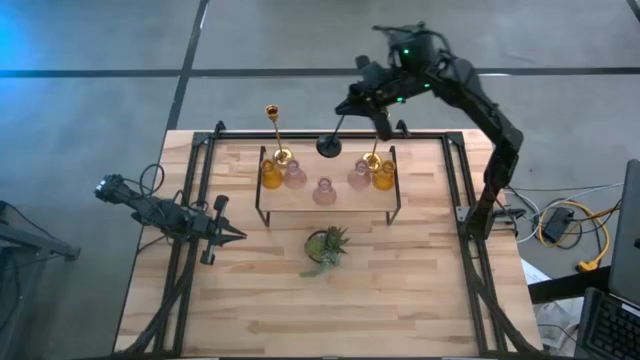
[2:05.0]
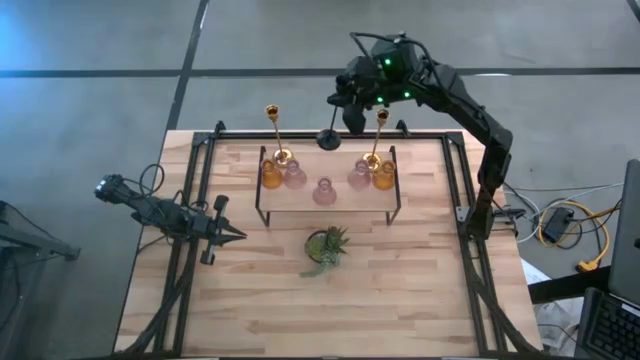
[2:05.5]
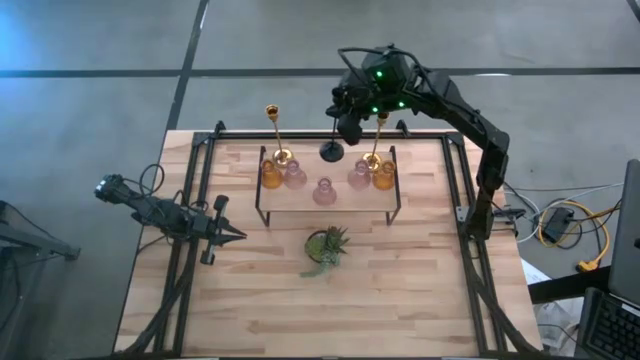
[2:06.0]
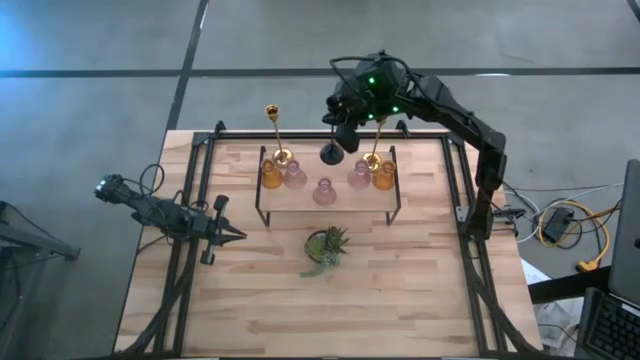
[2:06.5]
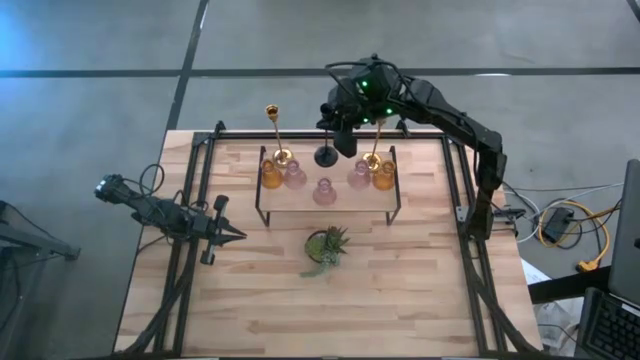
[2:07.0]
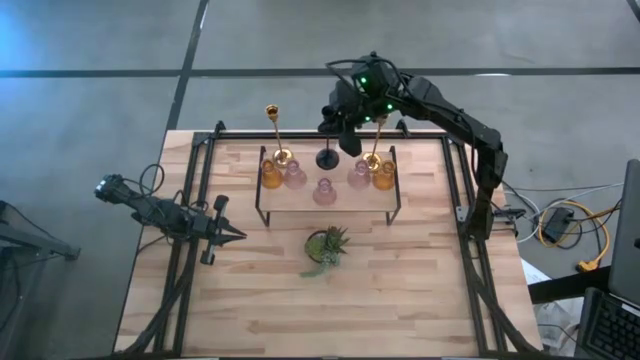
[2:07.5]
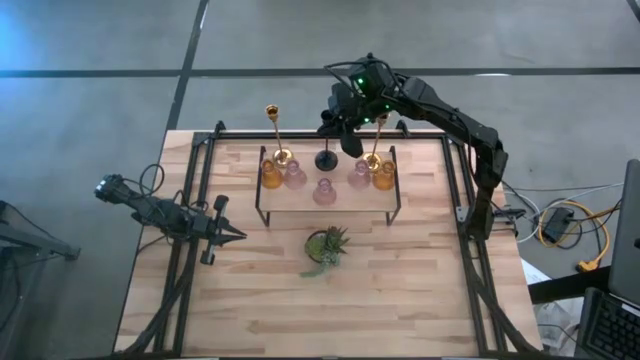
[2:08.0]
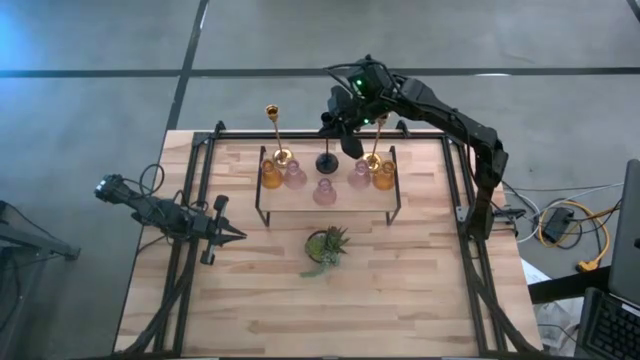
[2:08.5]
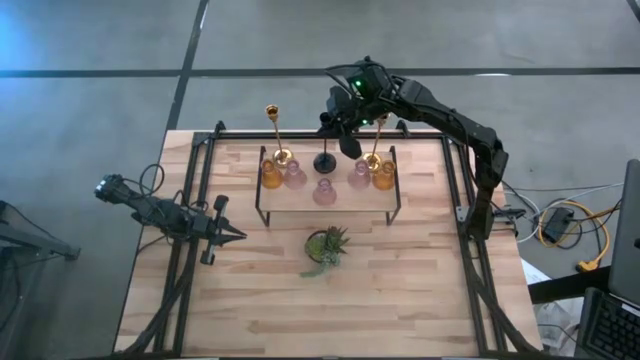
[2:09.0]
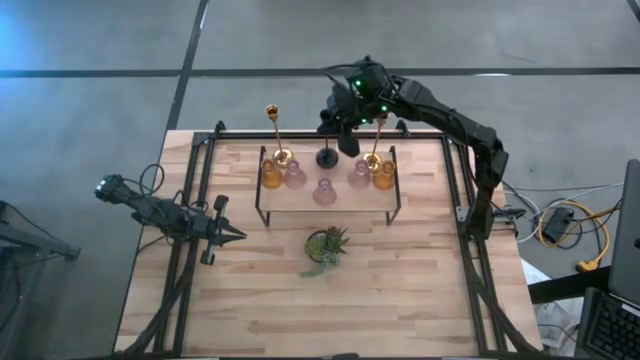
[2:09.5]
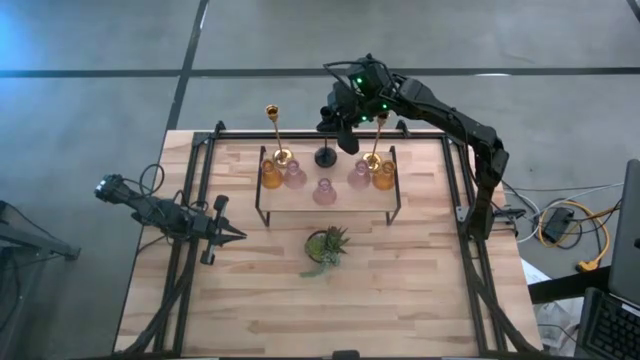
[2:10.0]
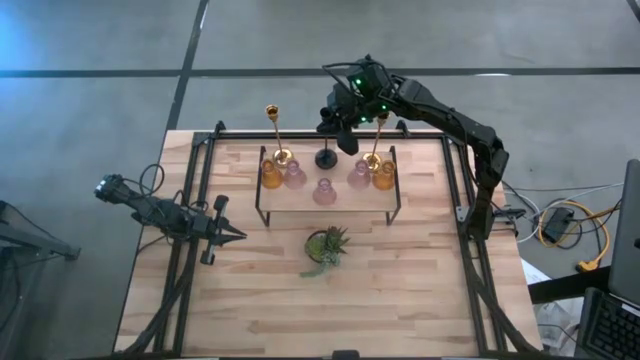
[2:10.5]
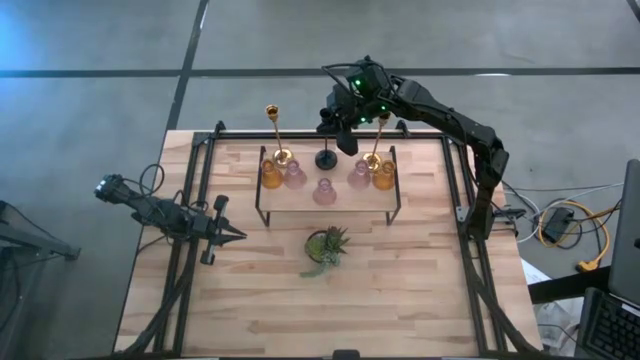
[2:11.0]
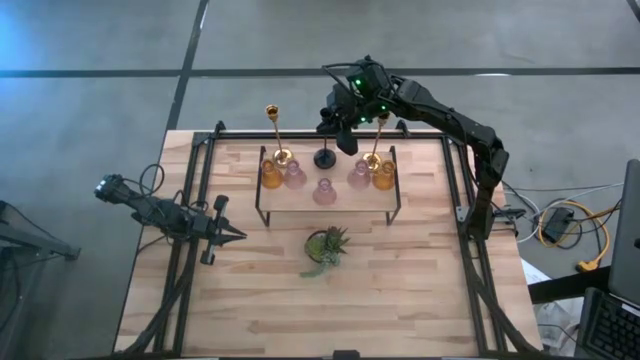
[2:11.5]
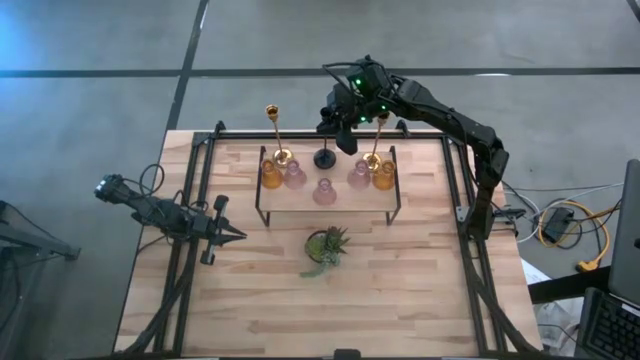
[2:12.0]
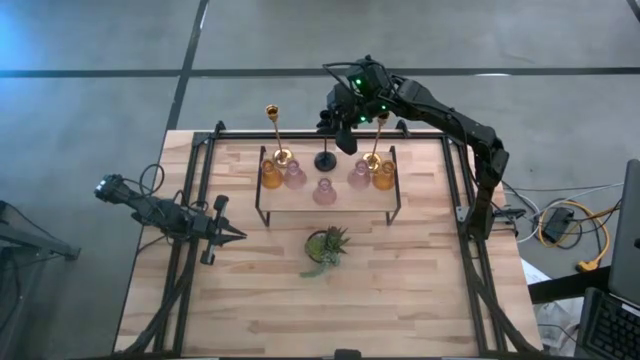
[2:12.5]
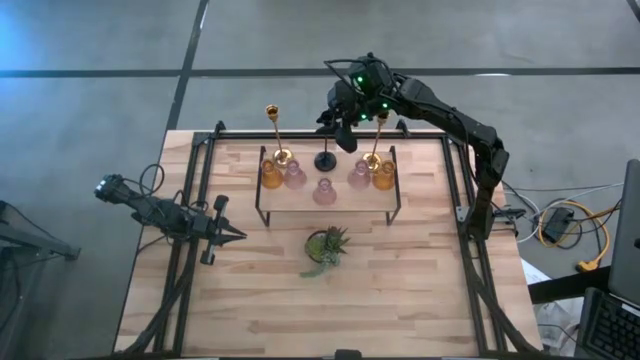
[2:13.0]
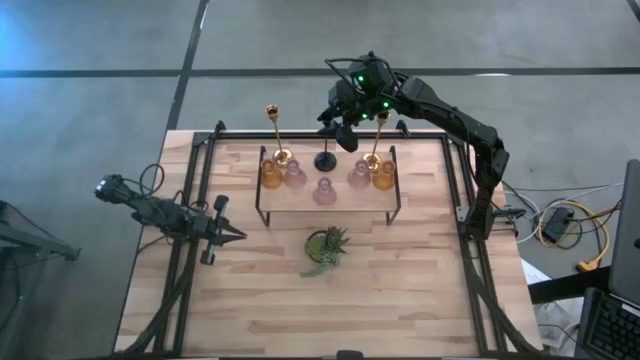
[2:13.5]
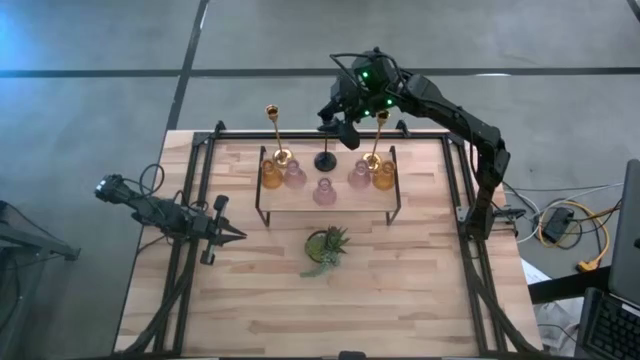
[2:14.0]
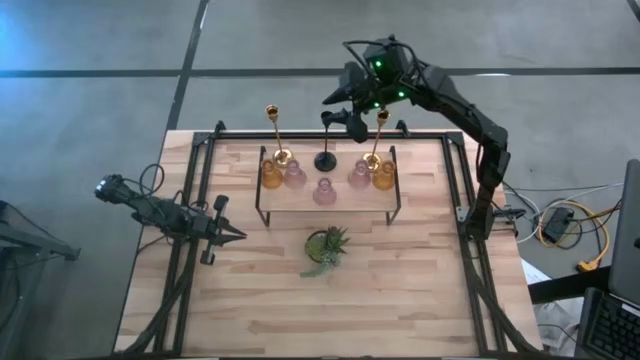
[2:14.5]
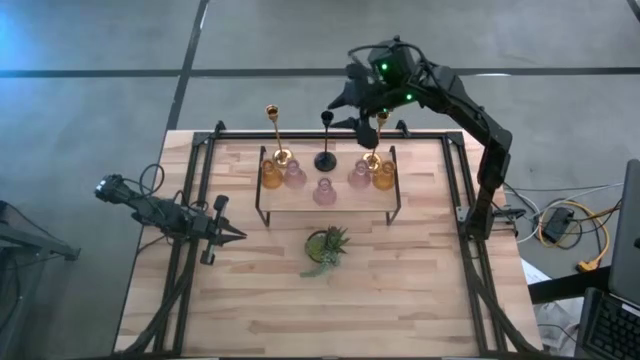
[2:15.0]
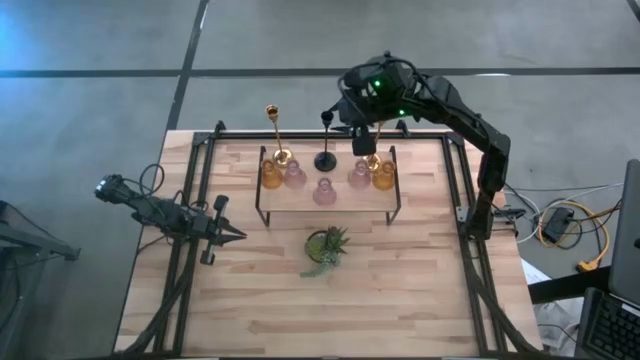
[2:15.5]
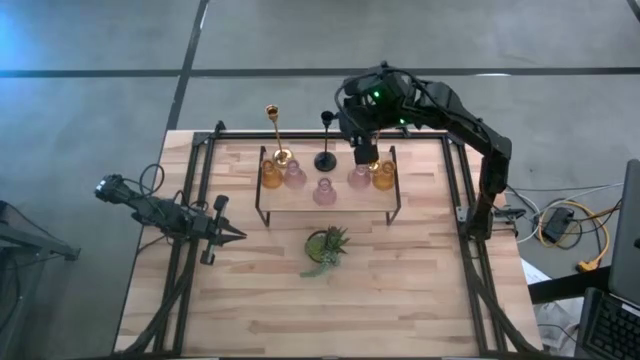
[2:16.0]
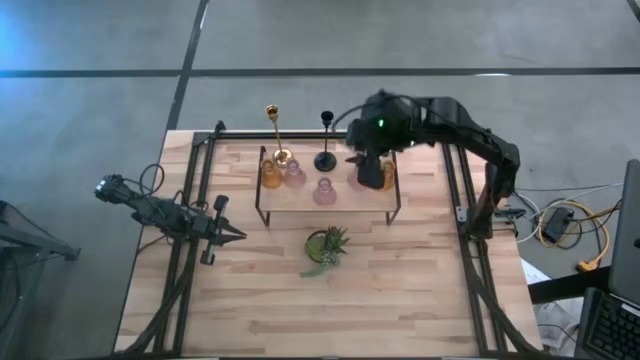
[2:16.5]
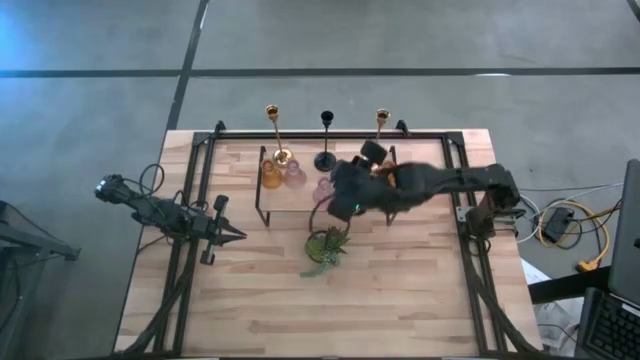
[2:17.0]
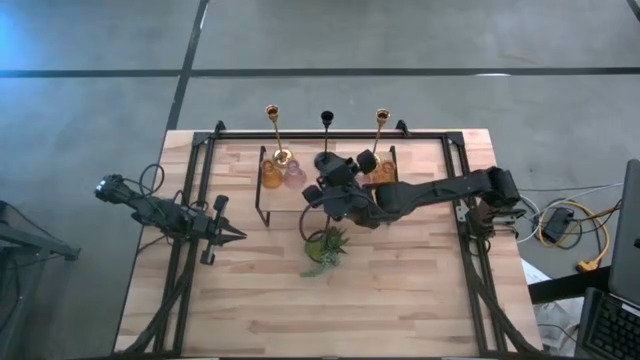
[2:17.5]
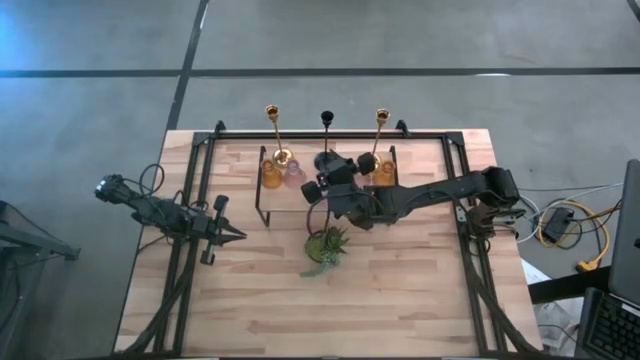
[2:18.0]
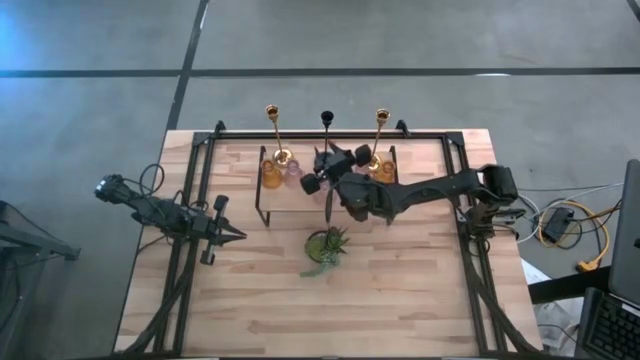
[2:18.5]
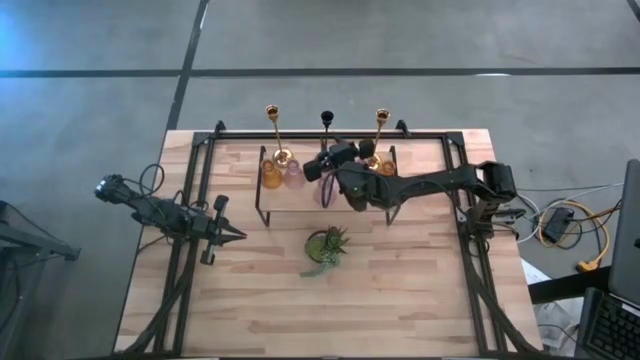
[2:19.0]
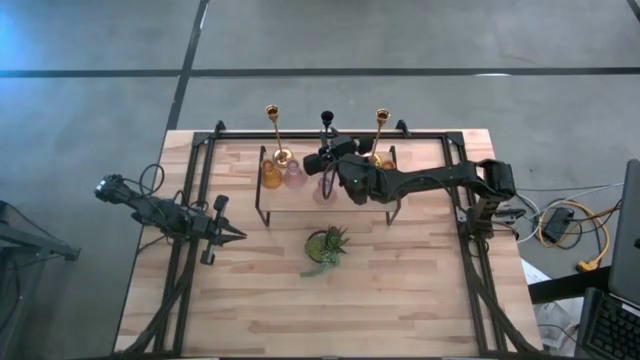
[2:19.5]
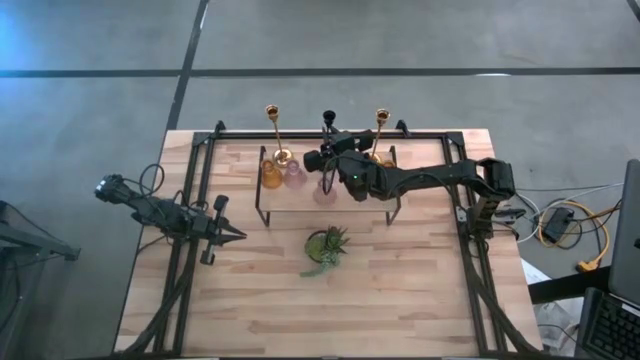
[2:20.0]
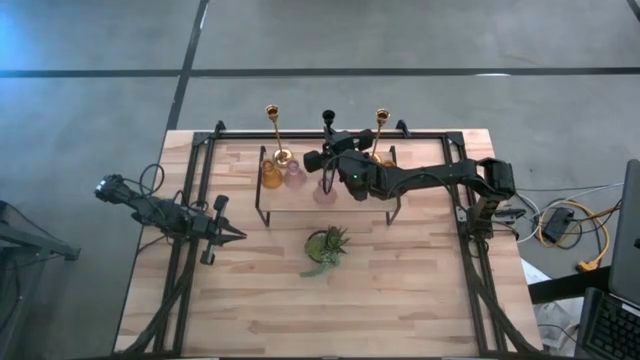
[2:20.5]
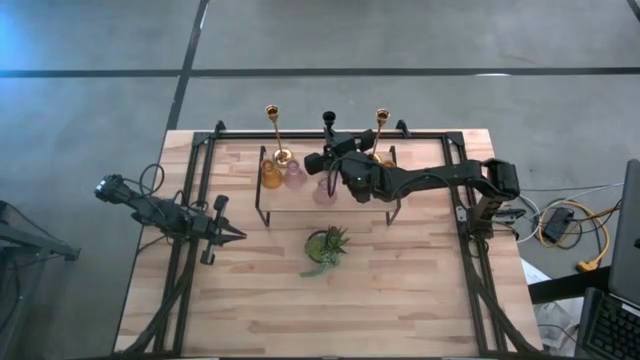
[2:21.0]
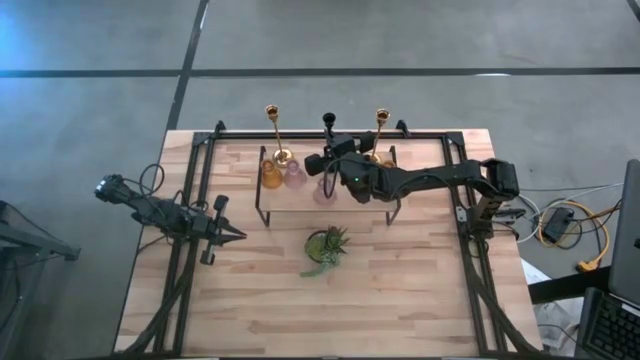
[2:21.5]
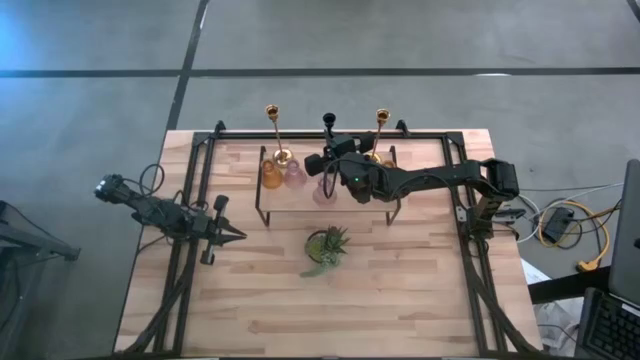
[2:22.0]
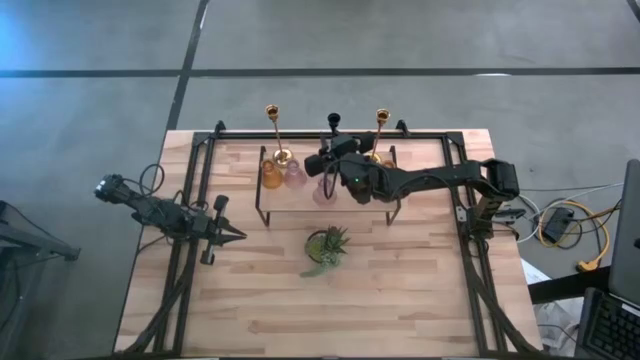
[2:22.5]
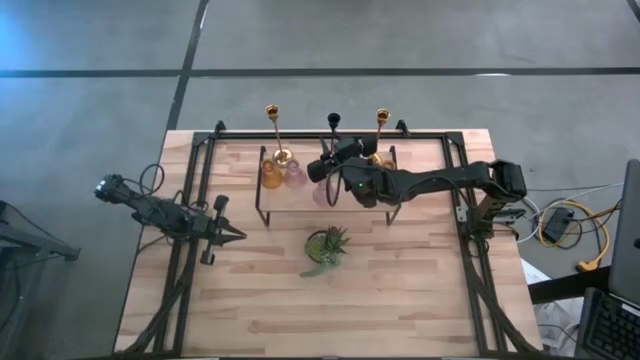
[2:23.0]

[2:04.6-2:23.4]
Task: Pick & Place candle stick holders
Put the black candle holder on the shelf

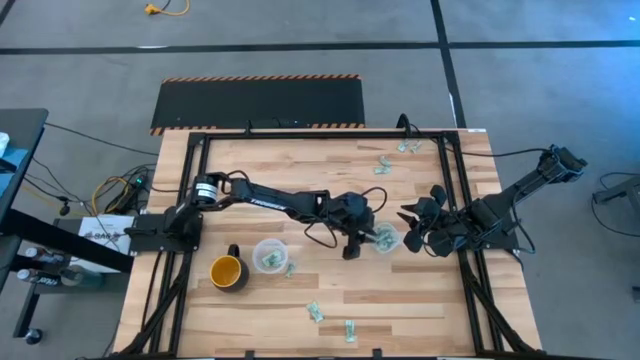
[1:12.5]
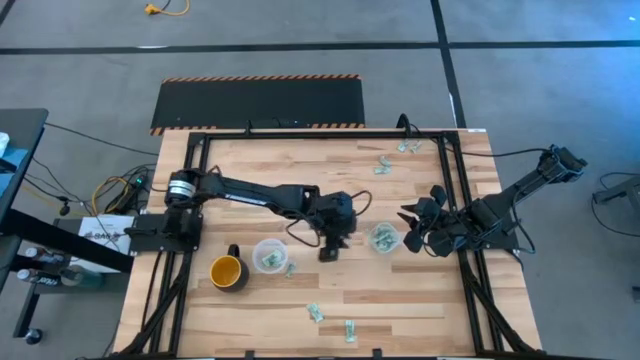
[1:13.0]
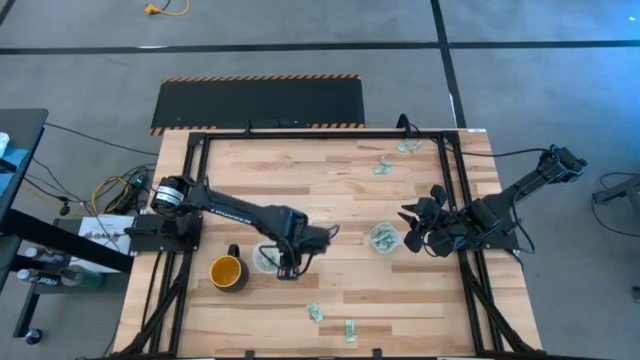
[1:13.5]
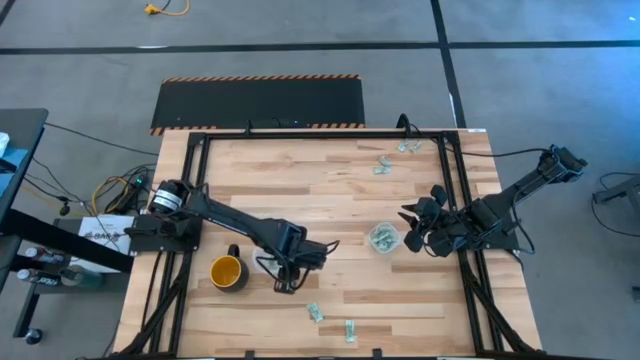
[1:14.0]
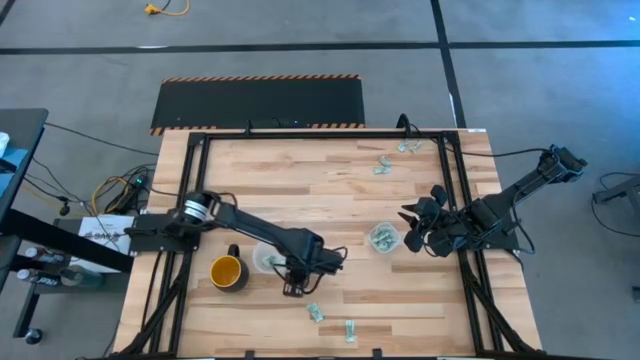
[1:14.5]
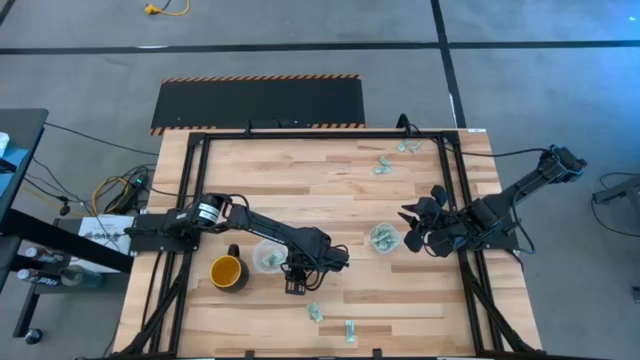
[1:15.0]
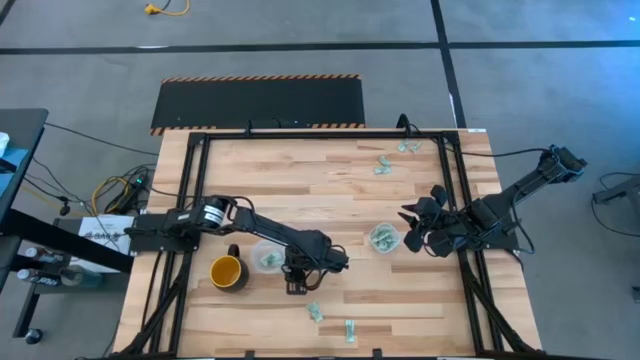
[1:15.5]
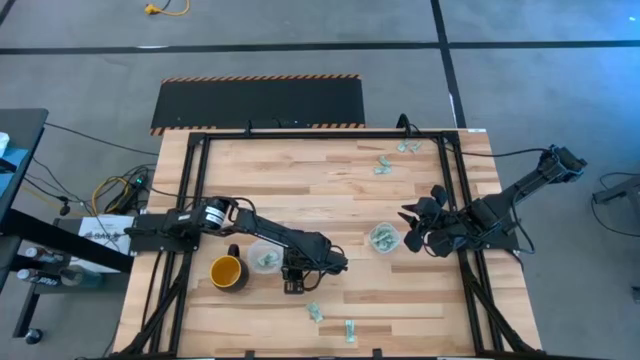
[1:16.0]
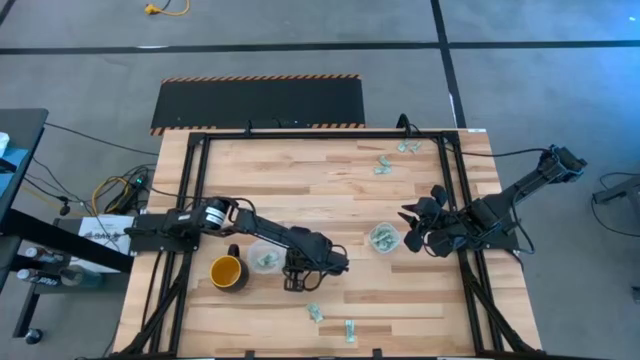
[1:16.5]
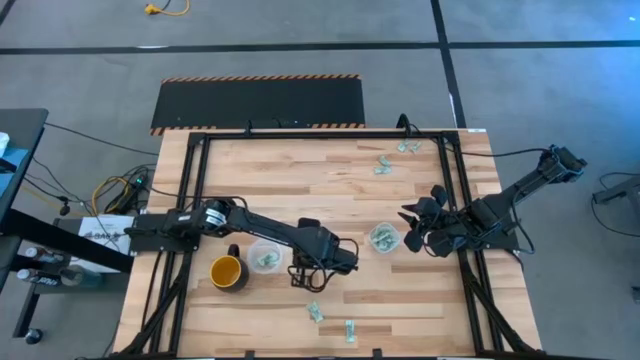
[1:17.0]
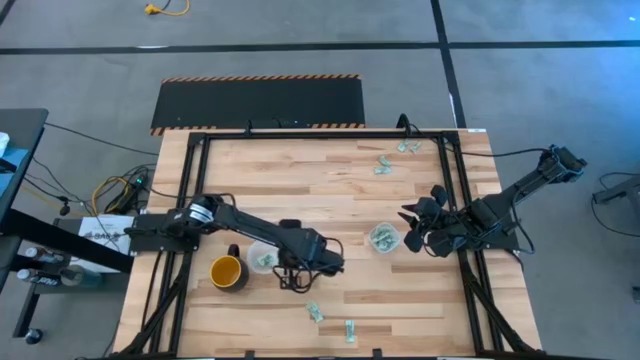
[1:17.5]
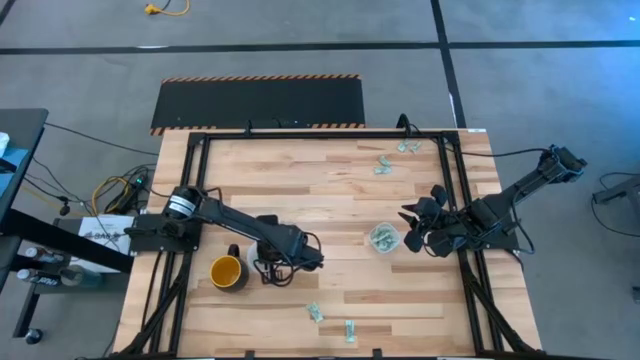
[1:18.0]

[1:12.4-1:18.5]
Task: Pick and place Stevia / Truvia into bins
Put the white stevia packet into the round transparent container
